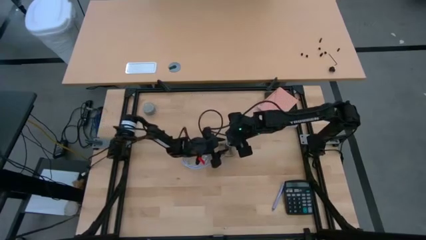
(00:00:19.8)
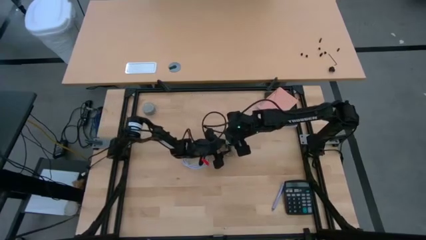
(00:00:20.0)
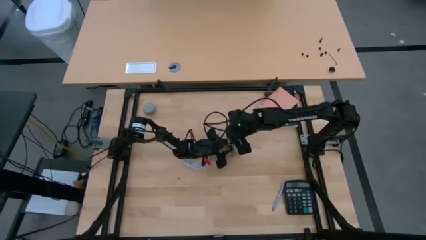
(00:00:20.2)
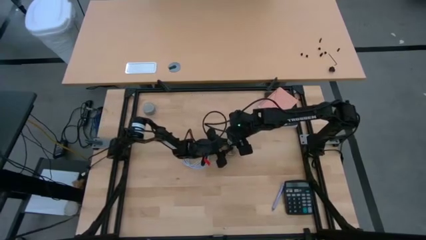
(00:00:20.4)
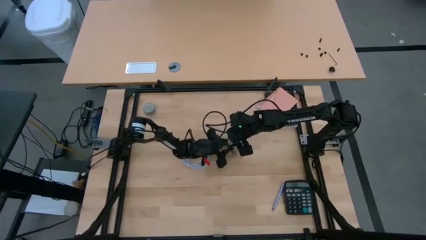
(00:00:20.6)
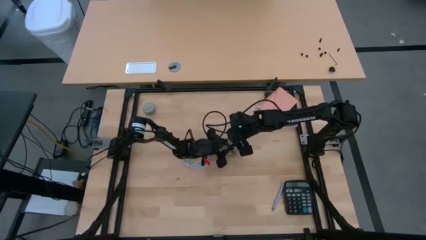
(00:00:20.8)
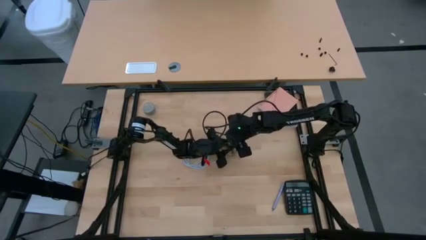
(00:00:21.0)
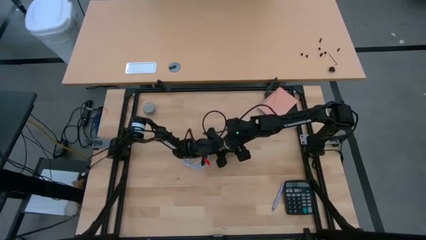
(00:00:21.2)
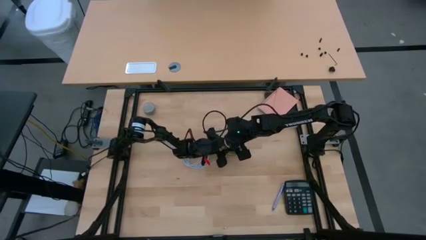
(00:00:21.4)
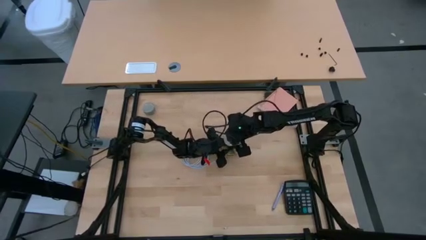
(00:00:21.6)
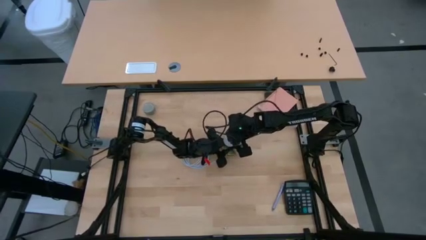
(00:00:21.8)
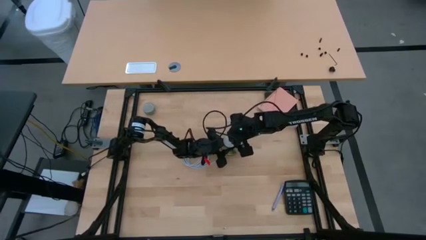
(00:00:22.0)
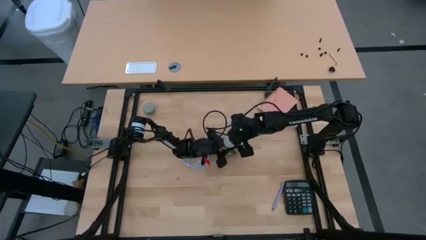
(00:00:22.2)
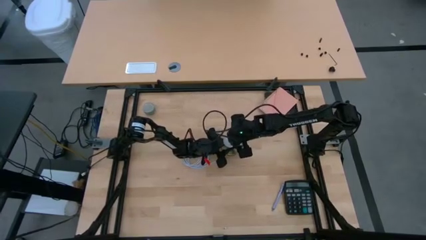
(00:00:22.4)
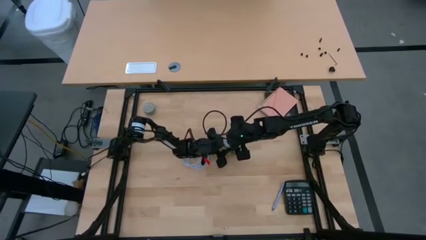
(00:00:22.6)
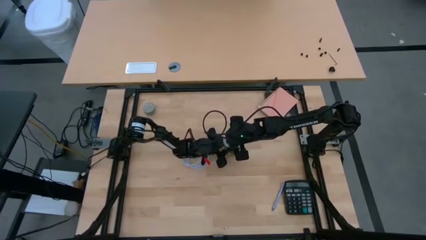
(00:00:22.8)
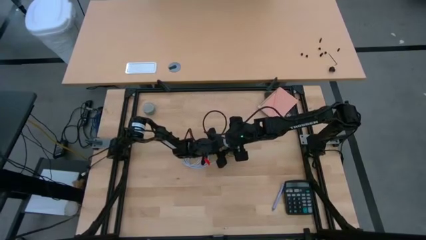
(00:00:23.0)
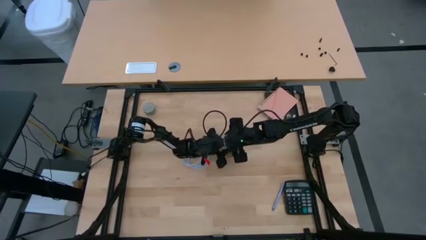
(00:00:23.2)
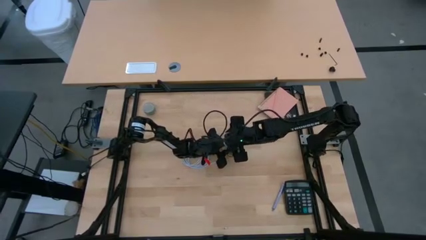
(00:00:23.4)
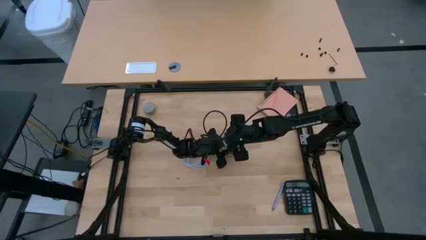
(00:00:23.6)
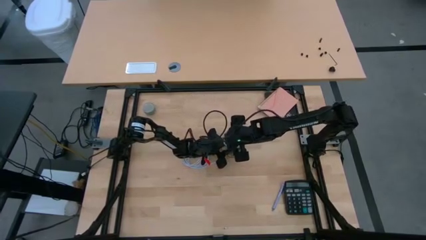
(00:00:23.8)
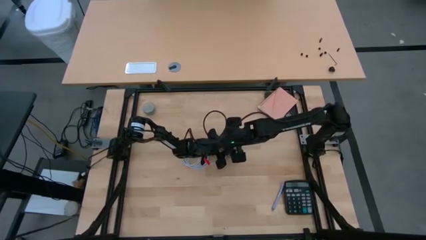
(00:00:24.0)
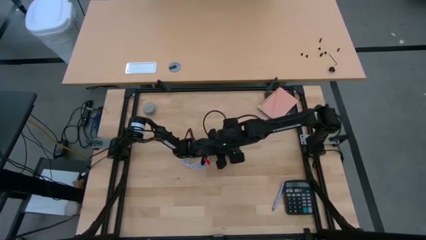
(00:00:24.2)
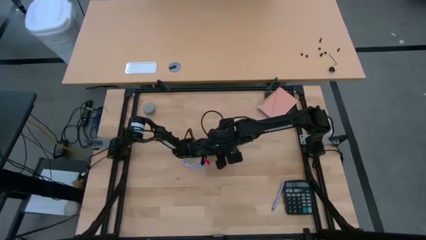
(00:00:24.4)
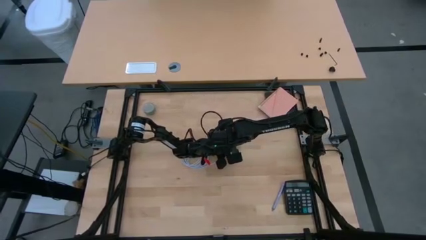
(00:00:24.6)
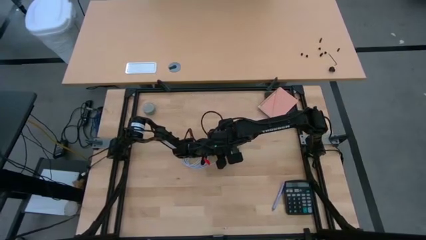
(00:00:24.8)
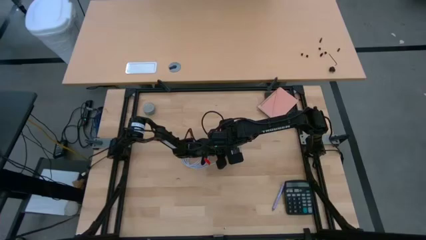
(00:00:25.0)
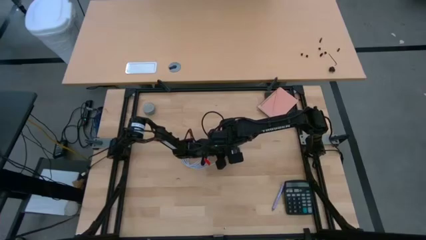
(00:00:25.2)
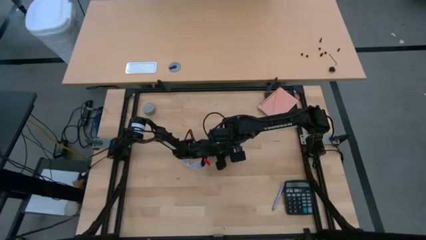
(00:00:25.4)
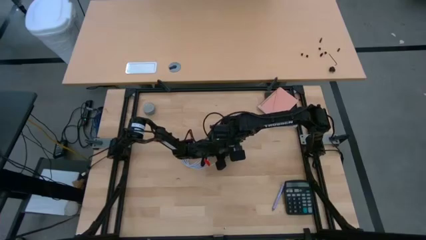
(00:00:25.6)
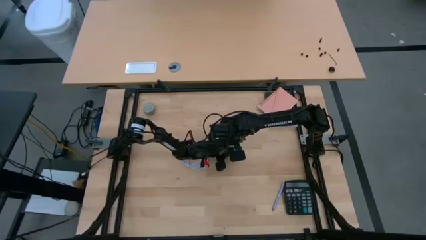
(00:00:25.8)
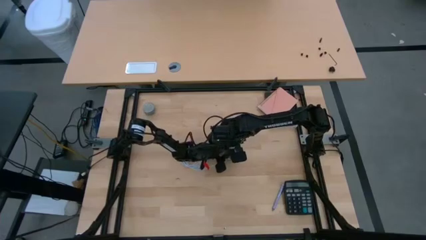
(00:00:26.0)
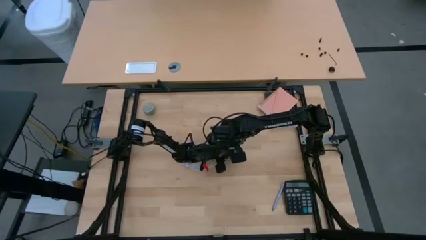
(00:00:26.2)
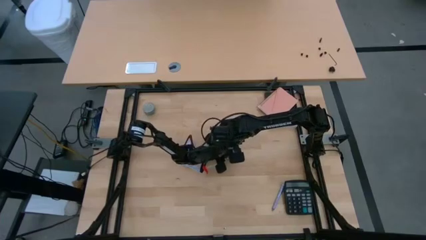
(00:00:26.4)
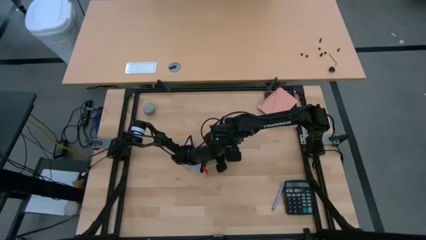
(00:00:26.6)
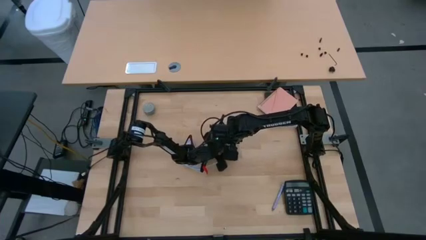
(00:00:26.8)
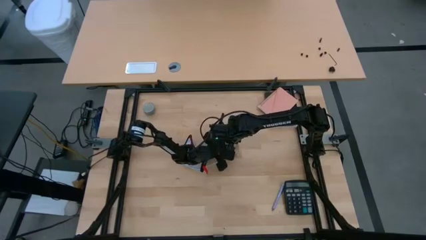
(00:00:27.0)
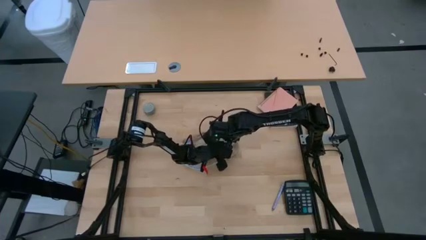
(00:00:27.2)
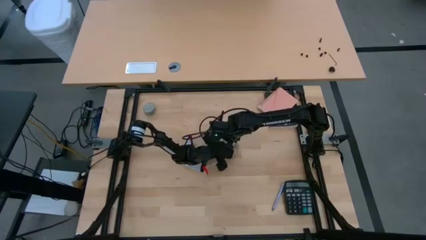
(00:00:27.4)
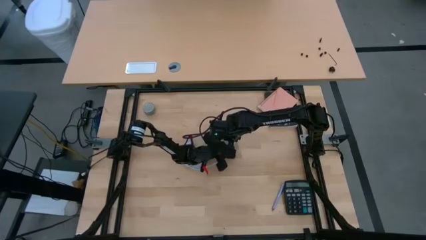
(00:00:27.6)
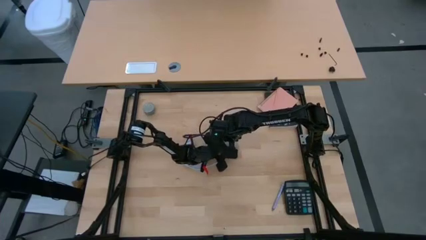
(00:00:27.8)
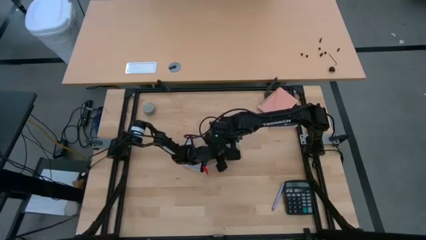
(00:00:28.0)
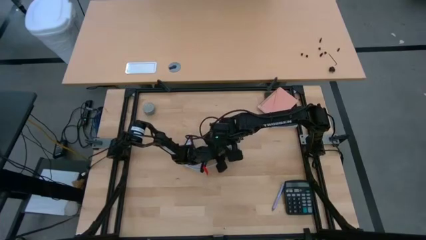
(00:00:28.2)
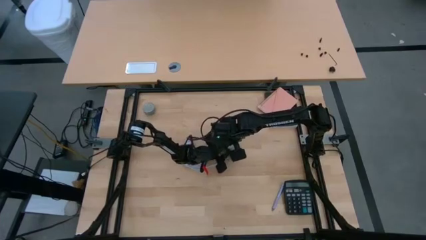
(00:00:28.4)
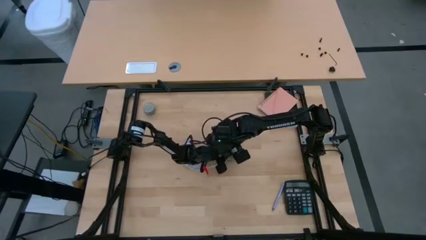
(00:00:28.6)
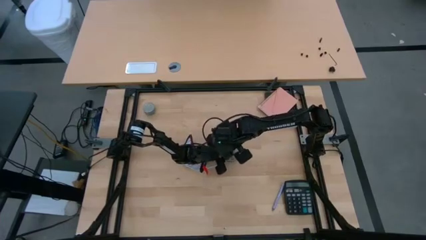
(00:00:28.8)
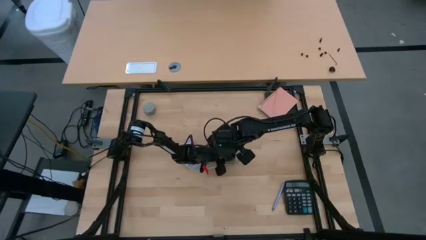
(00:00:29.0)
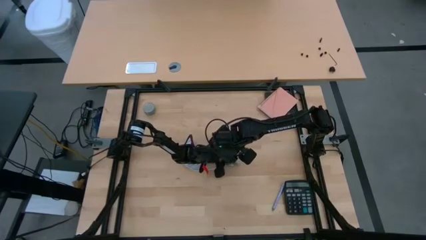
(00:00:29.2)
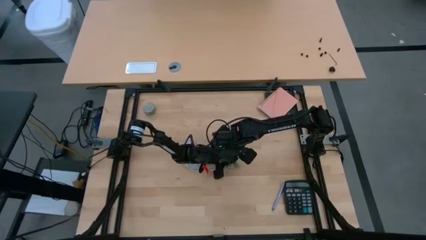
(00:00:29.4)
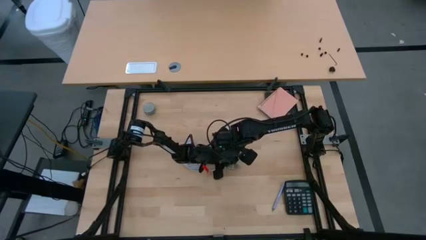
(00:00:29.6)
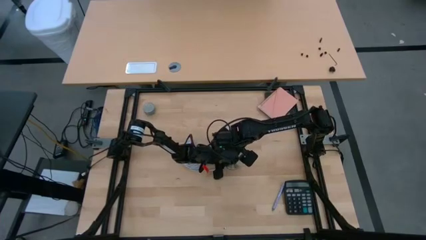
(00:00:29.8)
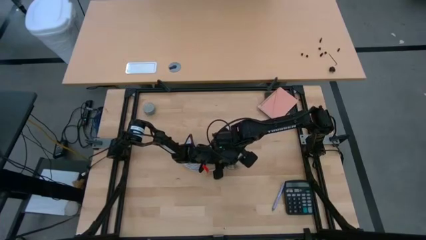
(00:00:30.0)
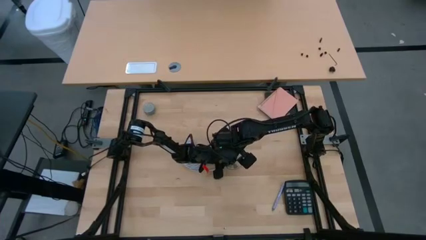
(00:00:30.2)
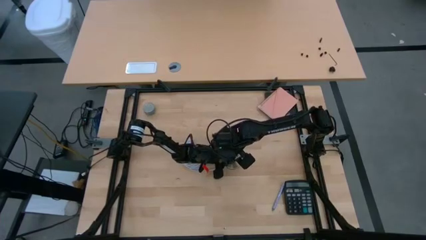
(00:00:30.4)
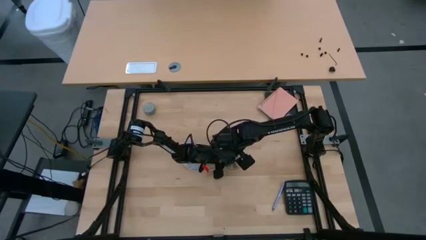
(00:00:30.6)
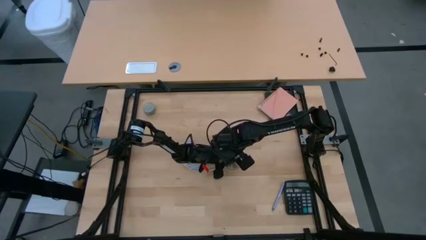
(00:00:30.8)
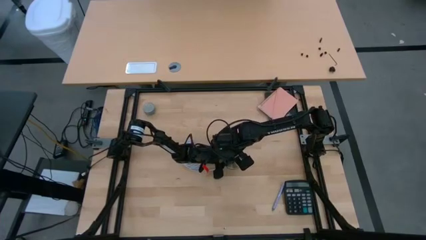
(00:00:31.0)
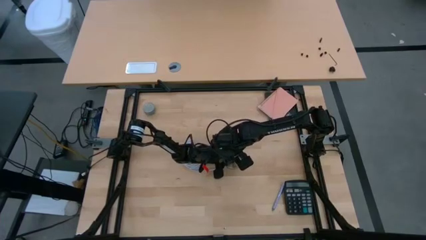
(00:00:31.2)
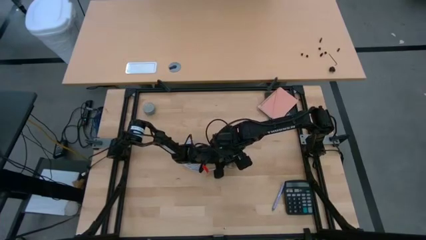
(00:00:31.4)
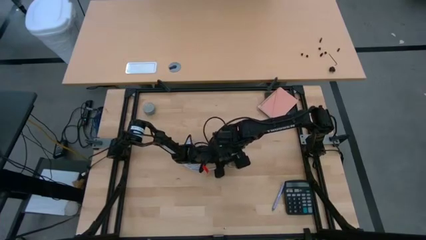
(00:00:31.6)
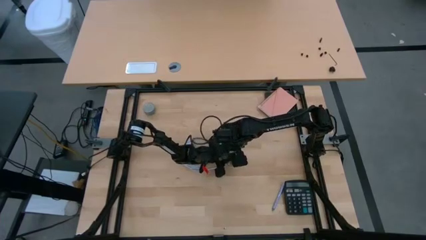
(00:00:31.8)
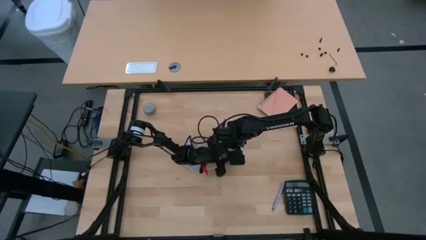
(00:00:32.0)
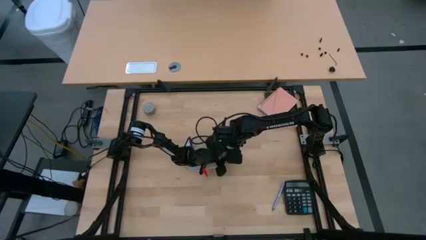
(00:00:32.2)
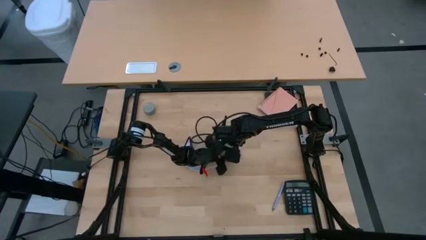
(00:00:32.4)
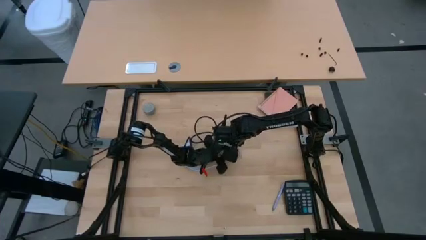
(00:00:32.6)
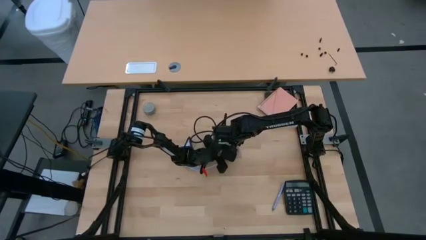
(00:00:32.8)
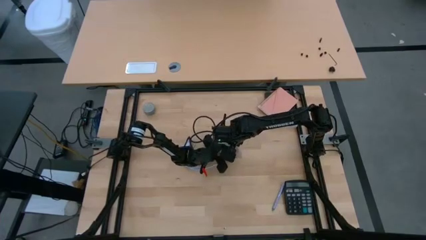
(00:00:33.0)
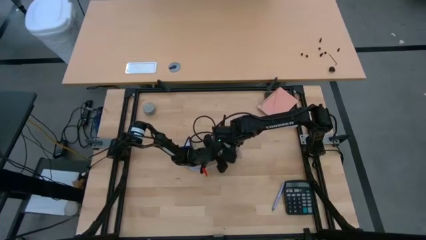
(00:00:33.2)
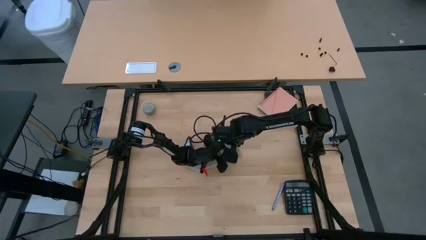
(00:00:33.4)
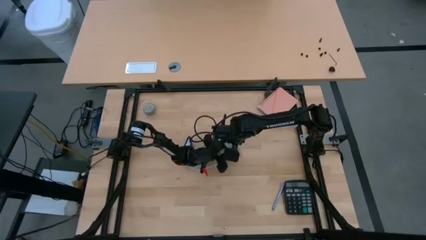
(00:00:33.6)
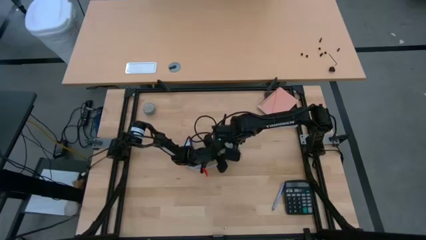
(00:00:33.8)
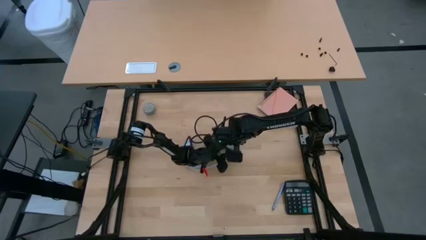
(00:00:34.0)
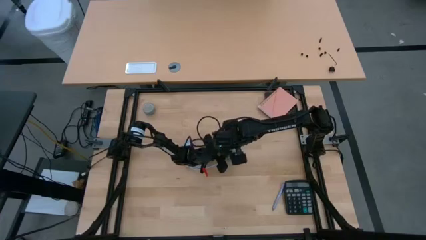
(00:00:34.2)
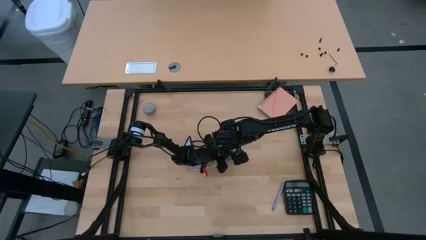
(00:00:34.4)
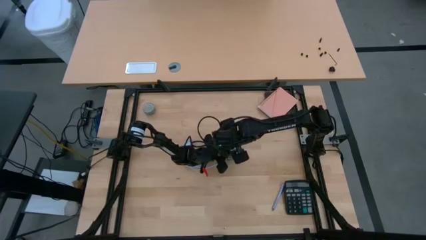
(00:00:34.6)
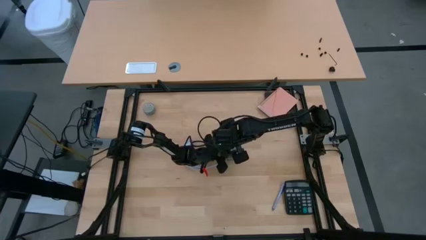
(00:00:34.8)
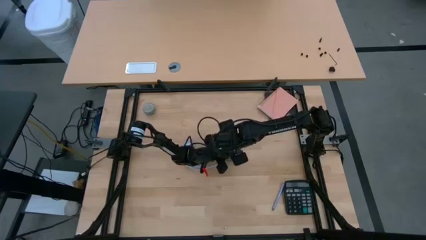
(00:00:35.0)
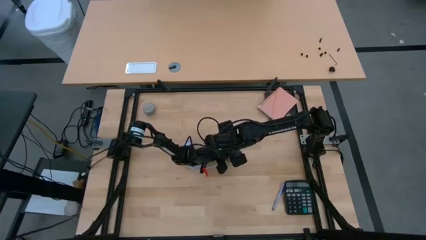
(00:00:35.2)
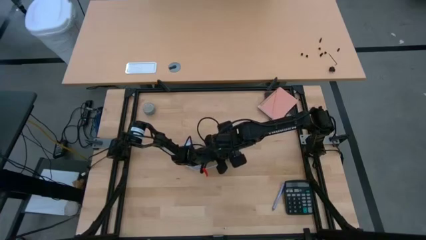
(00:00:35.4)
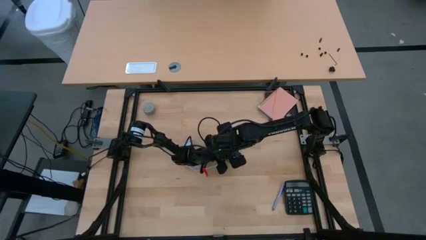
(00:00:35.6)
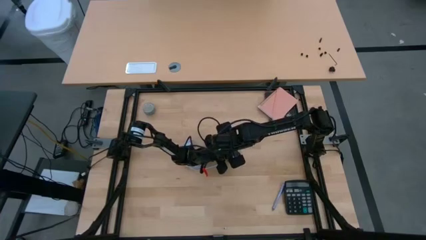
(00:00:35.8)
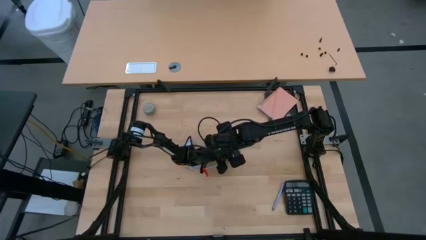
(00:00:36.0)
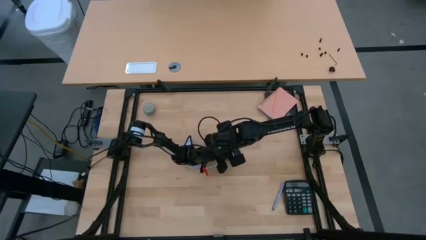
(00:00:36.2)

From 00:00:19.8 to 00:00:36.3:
Task: Screw lightbulb
Insert the lightbulb into the lamp
